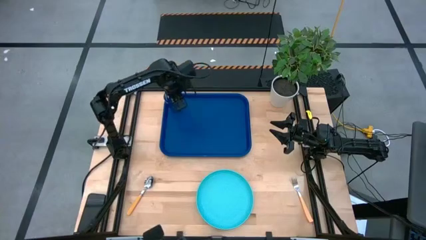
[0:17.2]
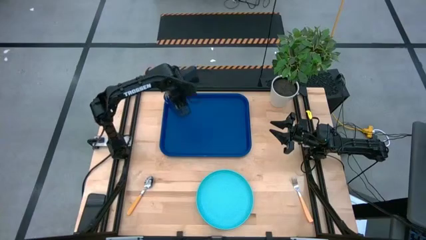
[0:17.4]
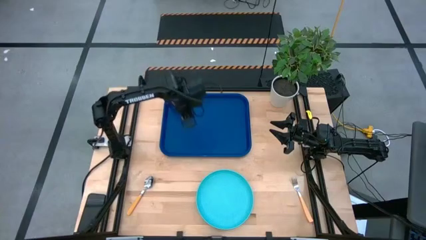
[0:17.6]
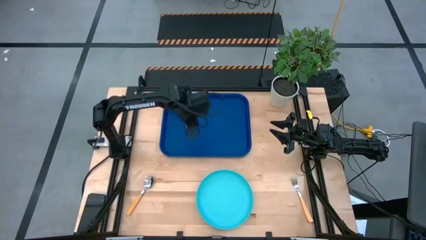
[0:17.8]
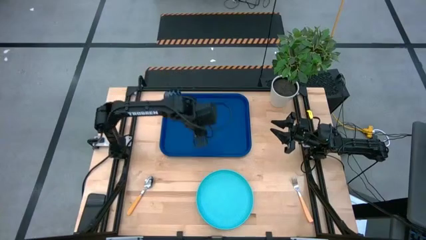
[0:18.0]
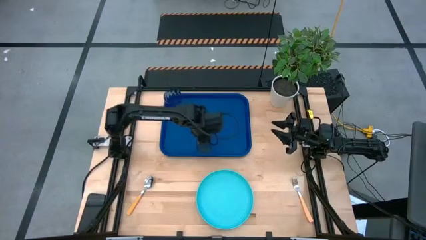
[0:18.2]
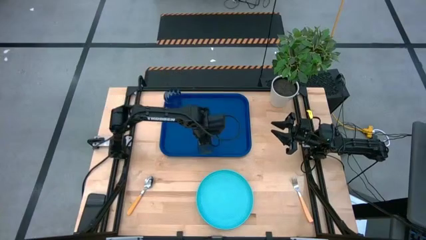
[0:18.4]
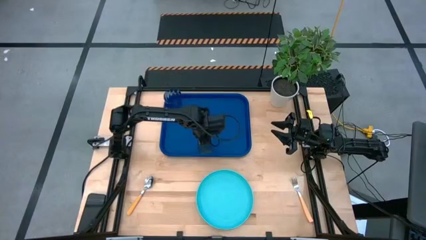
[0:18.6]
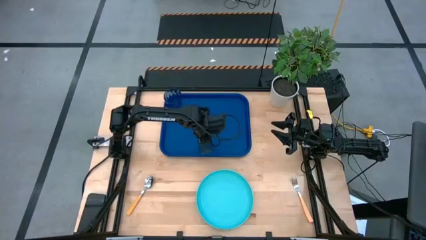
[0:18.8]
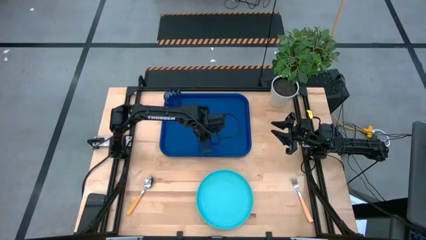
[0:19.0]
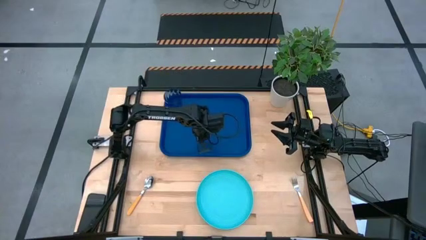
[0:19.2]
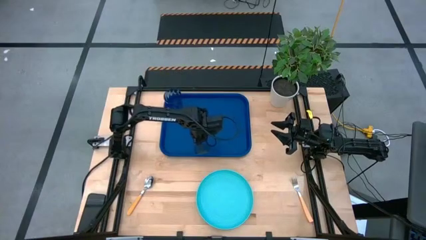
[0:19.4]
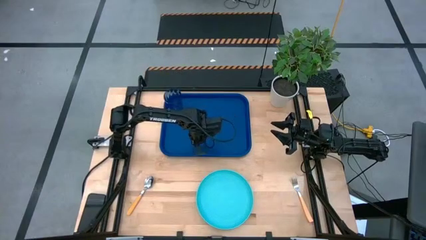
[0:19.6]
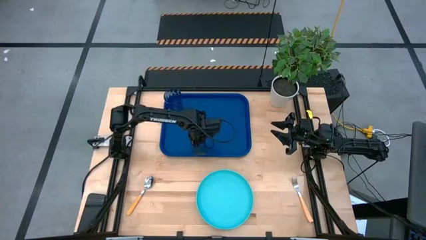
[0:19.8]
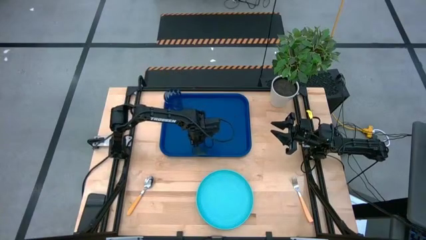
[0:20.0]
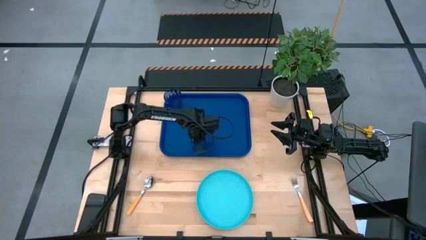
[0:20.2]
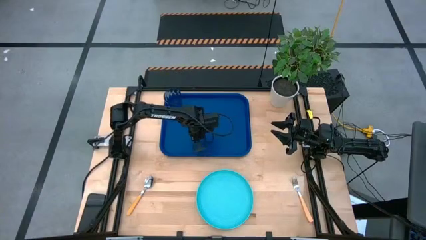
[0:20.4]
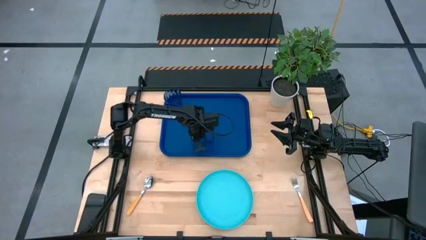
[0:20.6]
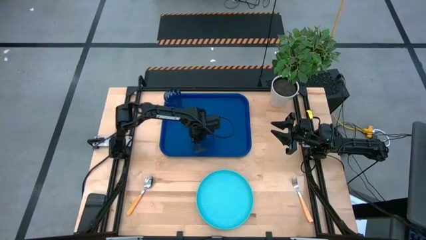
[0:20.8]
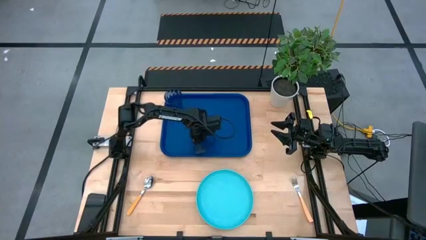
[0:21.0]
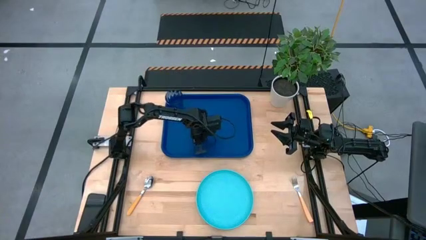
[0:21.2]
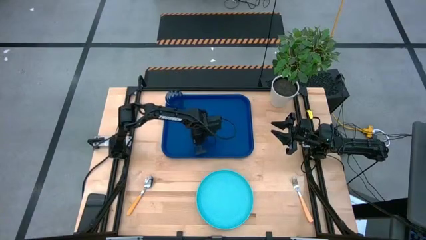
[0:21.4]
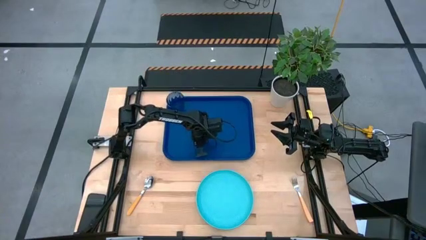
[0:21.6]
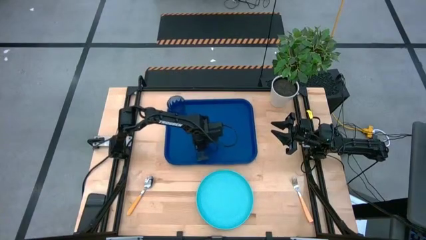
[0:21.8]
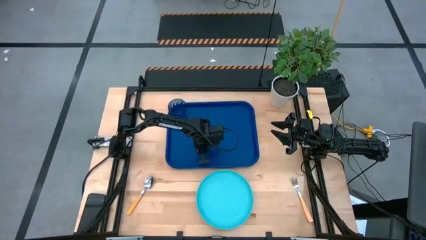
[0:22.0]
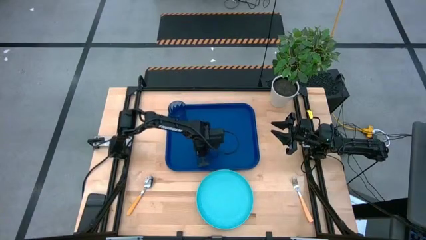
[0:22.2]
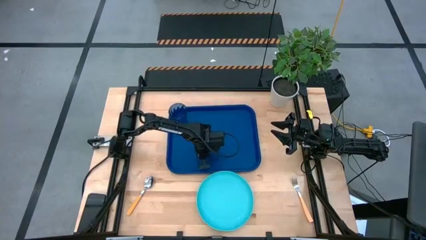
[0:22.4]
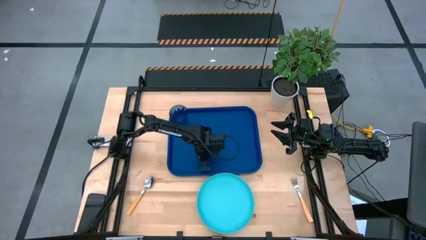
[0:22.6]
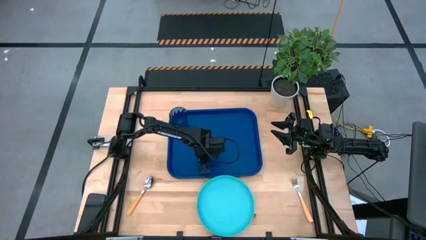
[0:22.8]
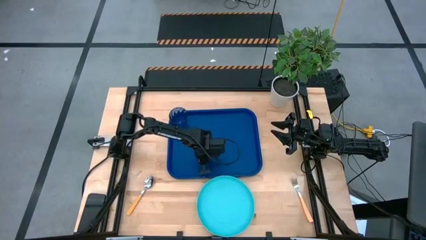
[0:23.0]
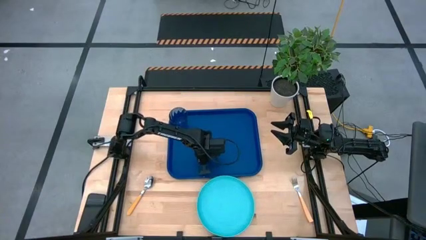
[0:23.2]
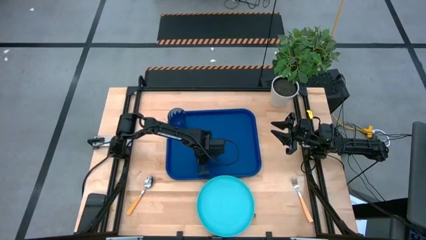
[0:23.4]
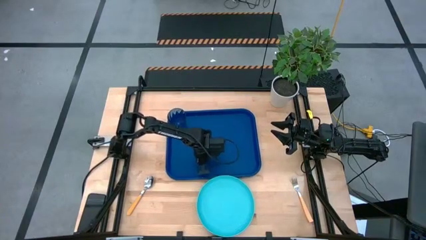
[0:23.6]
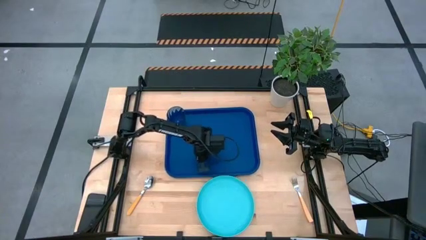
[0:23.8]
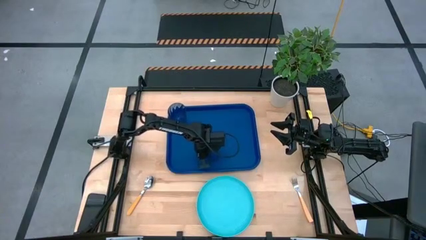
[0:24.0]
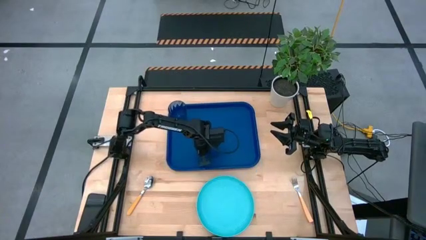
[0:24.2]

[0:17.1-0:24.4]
Task: Pick and place plate/cup/fork/spoon on tray
Adjust the serving tray on the table

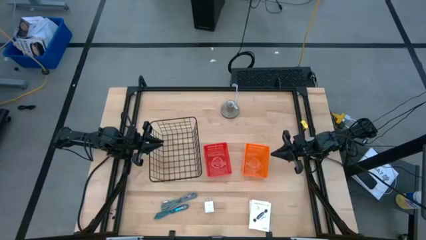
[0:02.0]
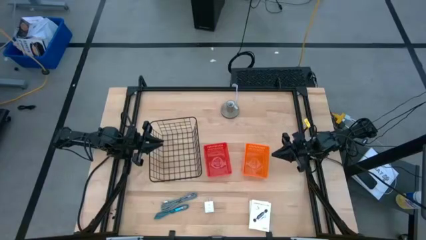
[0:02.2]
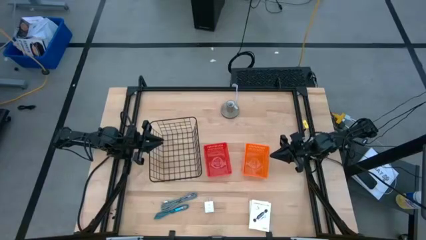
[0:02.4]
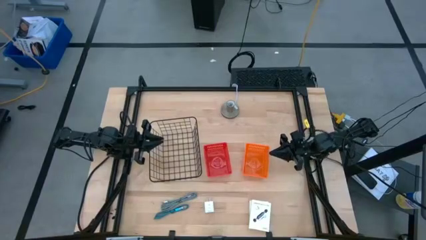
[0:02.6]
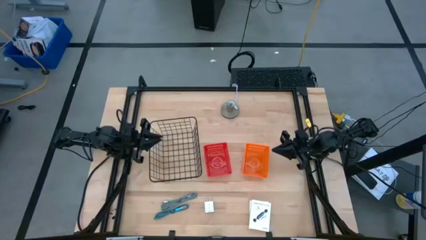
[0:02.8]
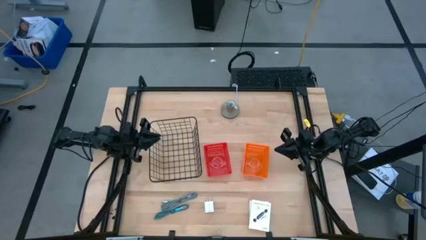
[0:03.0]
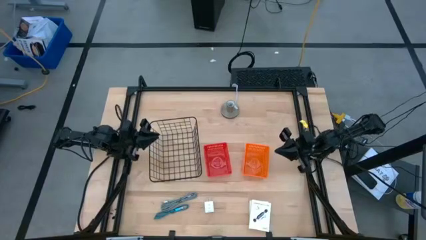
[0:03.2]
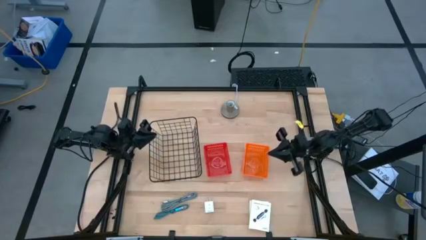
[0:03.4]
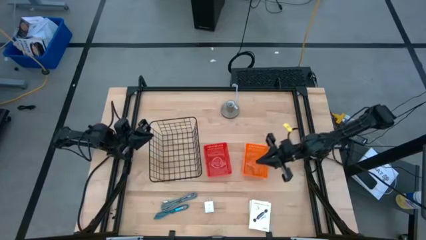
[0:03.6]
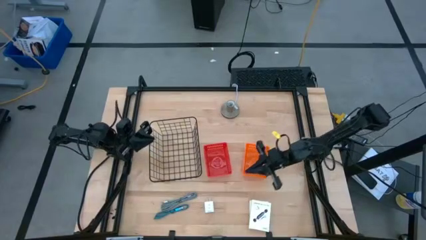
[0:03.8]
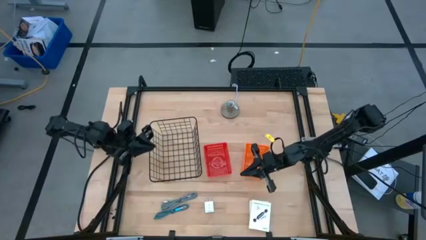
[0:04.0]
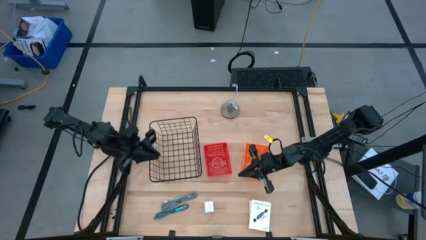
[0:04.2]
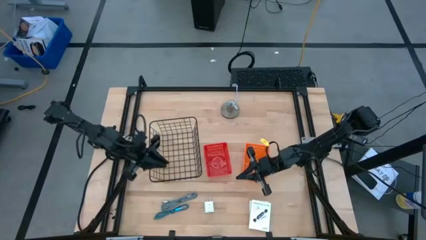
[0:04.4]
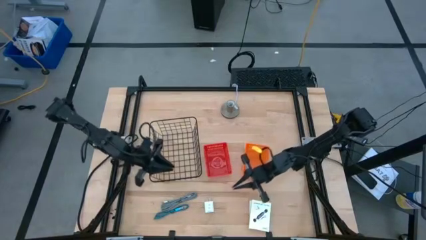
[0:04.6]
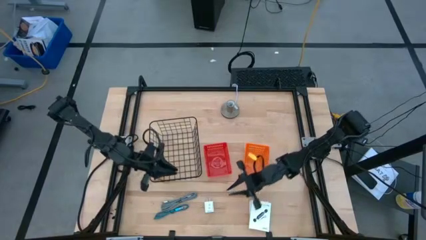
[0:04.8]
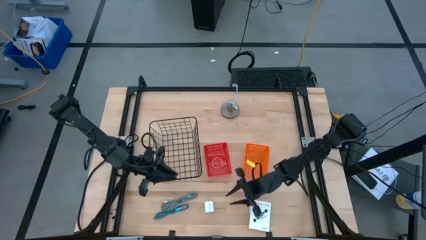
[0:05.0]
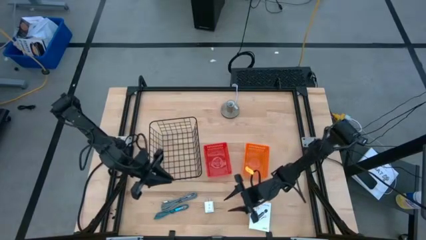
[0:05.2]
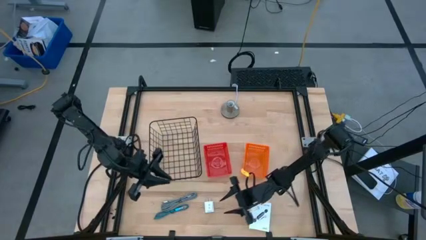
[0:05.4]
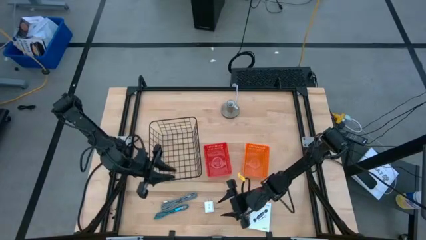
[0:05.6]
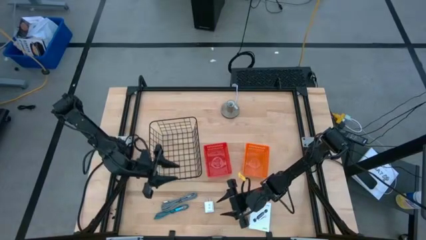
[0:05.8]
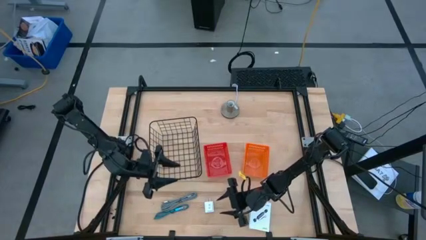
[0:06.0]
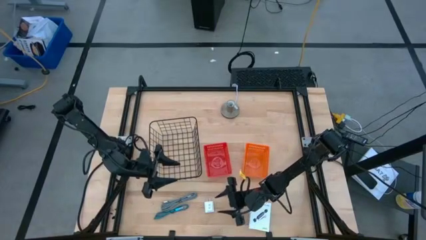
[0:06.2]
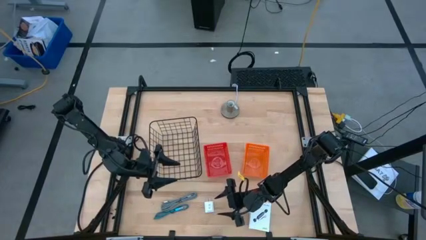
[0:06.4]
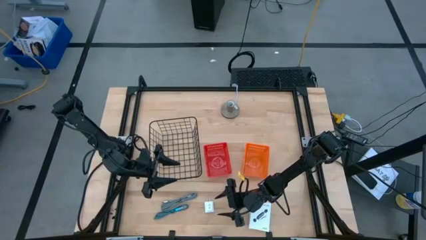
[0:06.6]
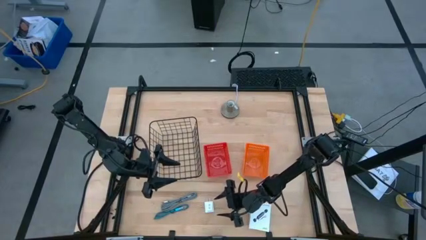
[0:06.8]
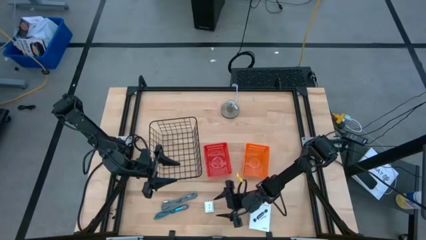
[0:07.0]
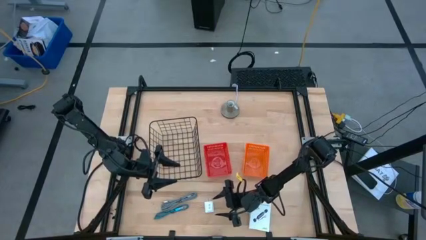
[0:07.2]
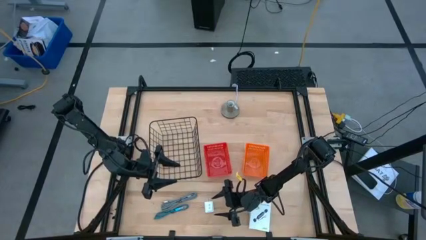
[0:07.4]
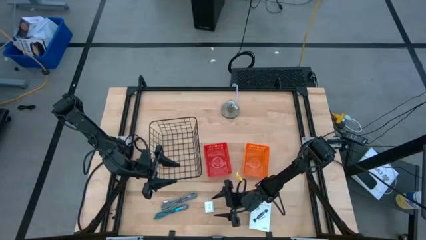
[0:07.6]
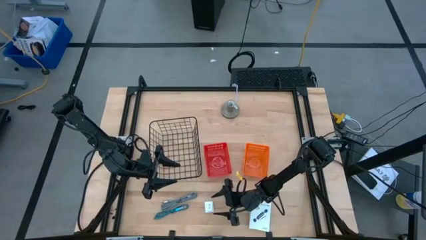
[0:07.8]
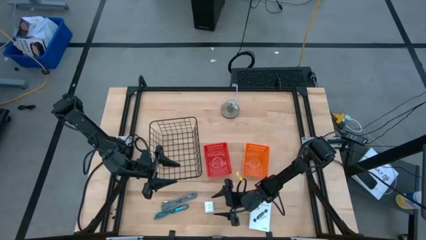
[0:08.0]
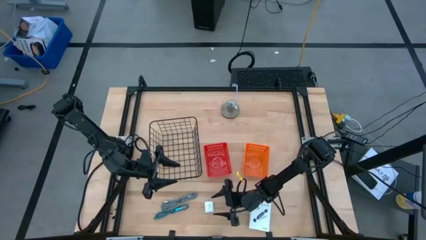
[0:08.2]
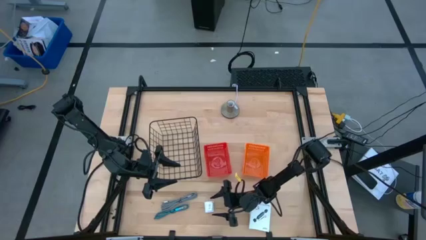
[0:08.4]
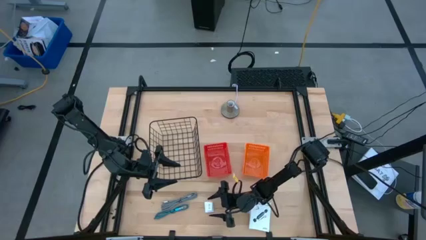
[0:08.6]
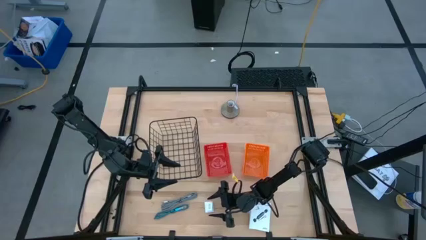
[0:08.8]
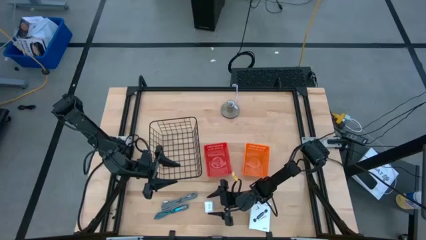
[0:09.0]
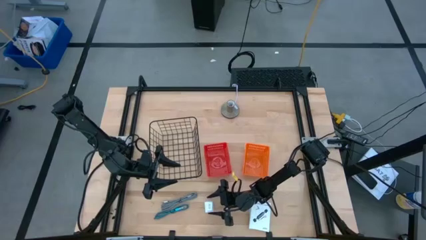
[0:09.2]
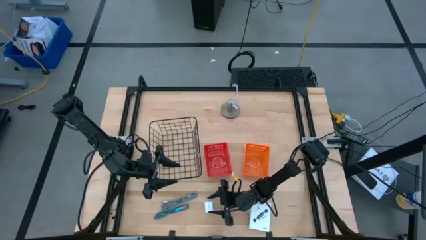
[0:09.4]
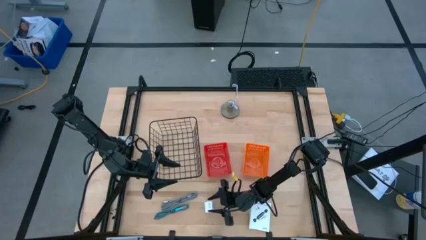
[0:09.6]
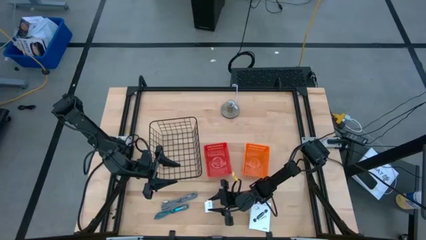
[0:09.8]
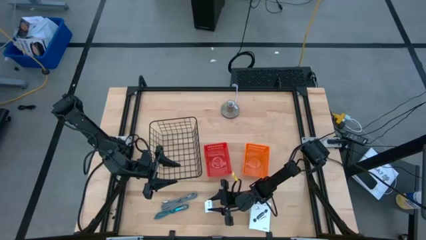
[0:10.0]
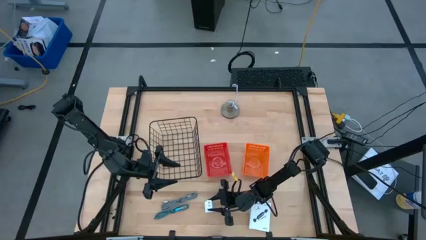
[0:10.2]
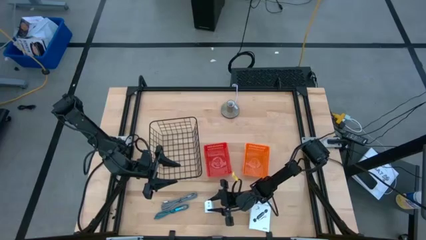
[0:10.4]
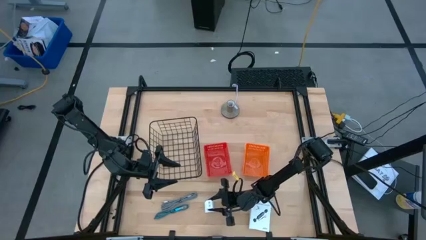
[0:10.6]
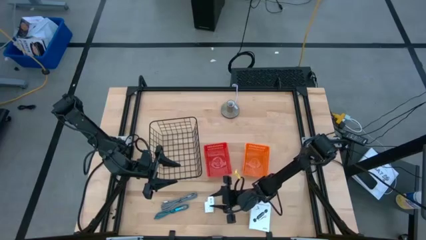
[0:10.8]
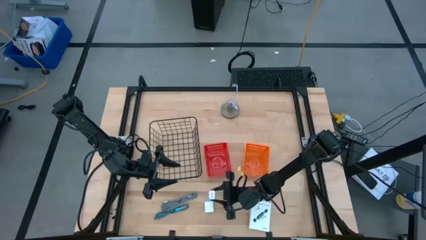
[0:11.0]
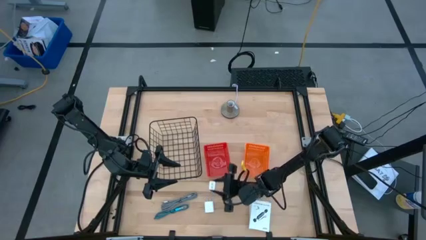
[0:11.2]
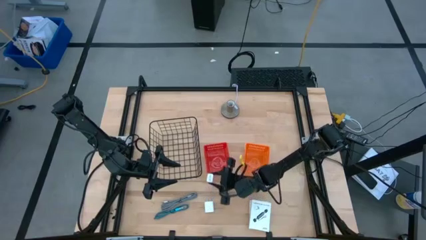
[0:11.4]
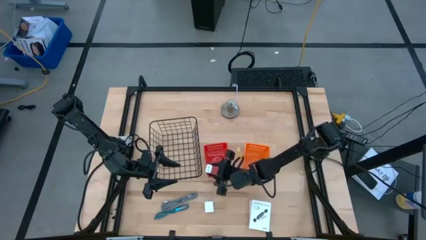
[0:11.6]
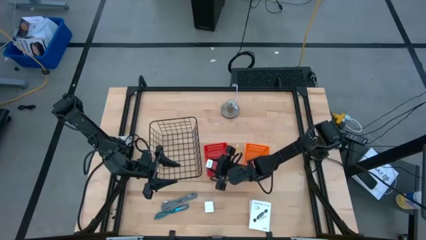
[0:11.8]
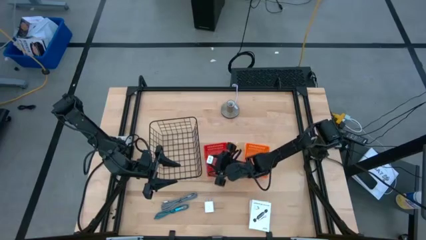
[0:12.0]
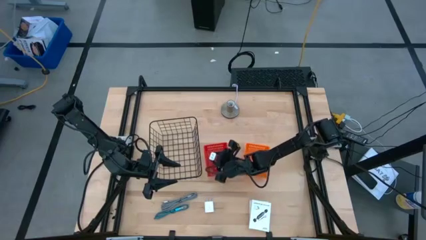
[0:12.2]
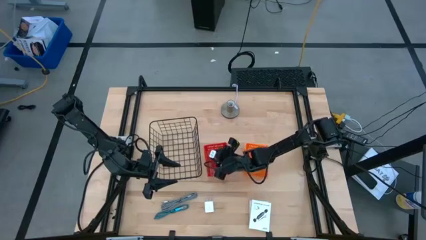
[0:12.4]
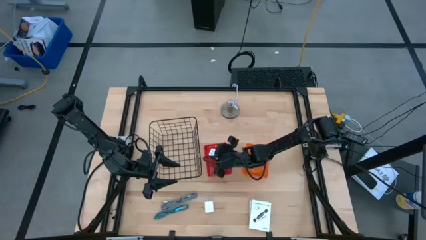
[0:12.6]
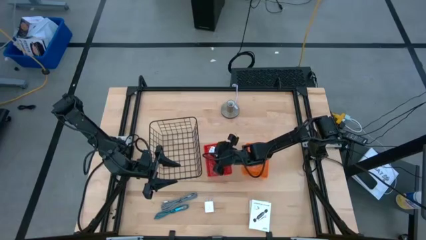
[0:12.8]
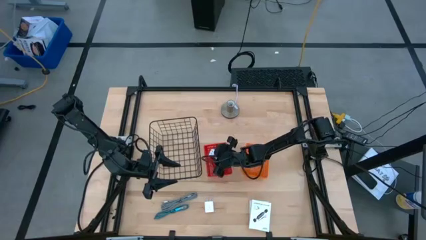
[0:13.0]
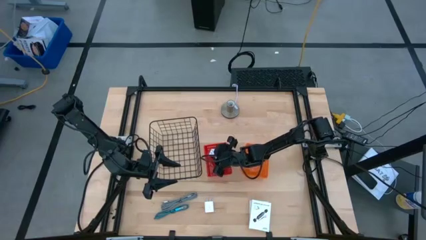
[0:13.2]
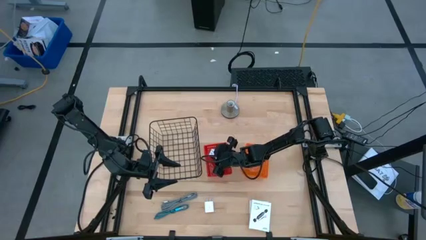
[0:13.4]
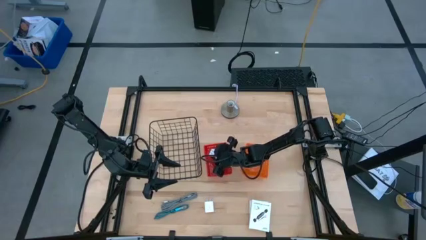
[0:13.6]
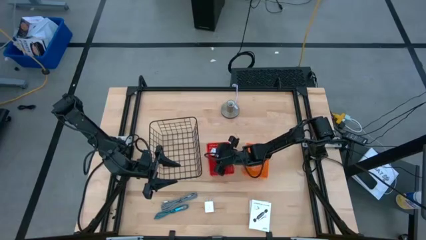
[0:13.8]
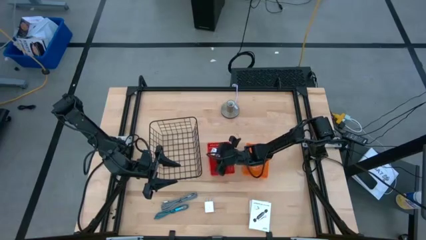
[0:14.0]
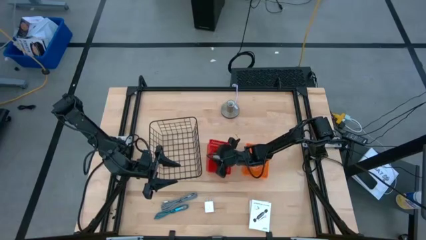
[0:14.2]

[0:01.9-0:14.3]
Task: Pick and place items into bin
Put the white charger adapter into the red basket
